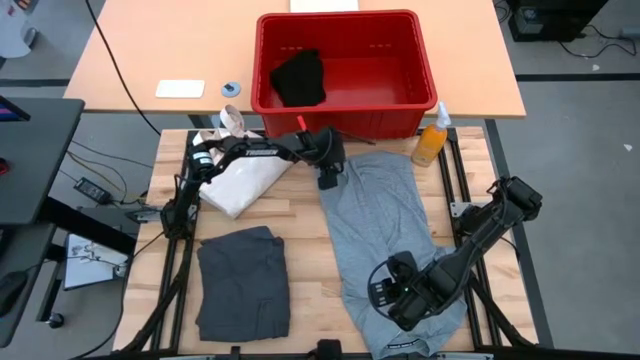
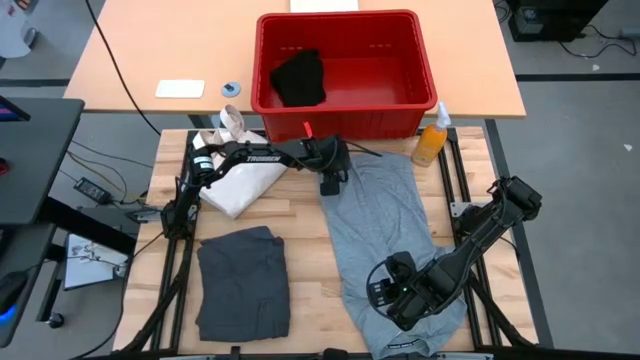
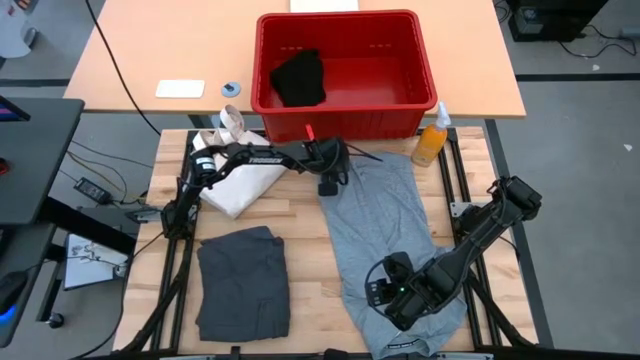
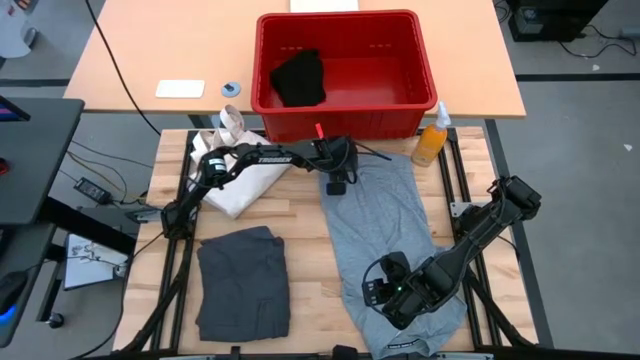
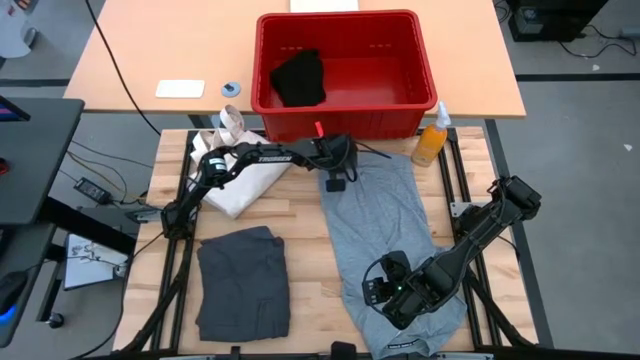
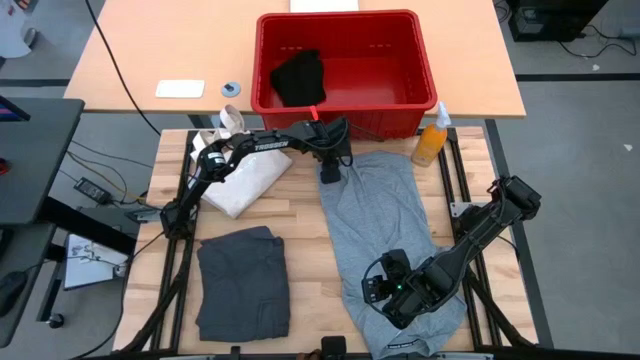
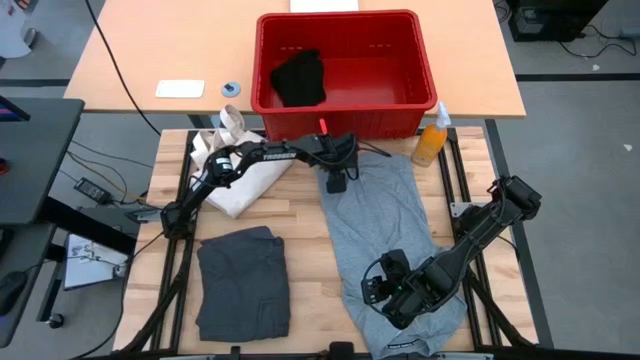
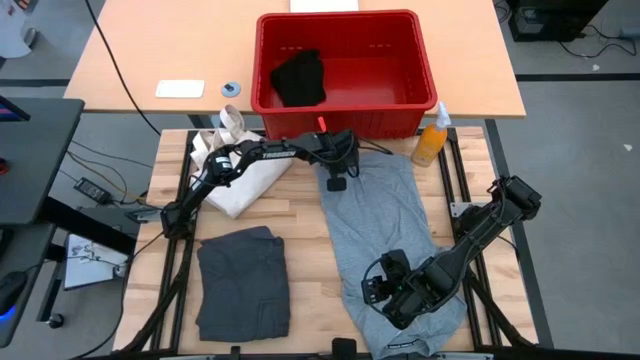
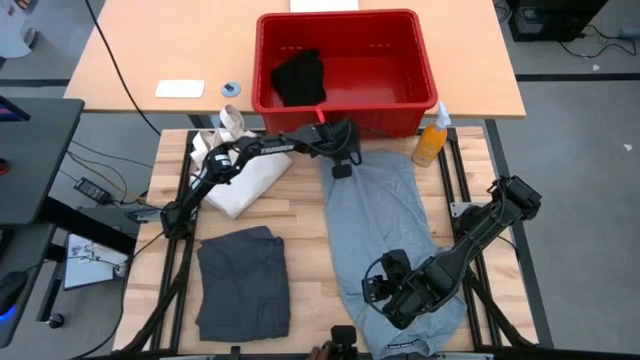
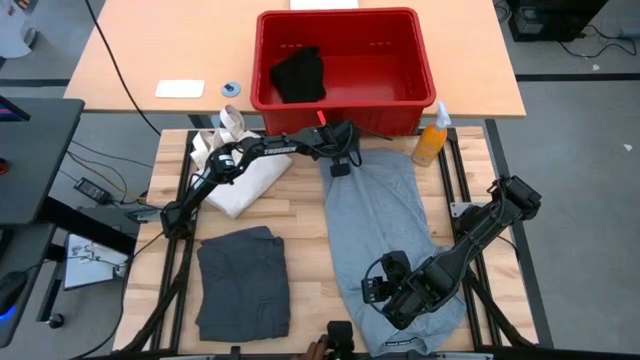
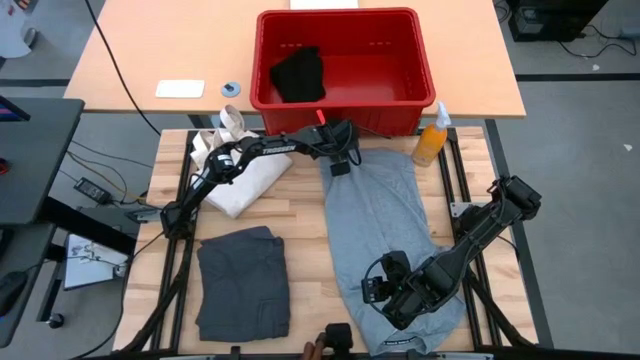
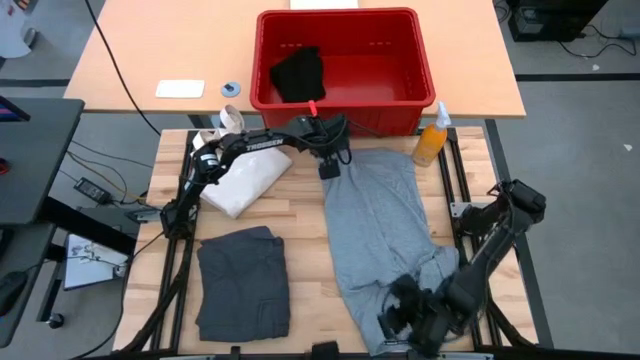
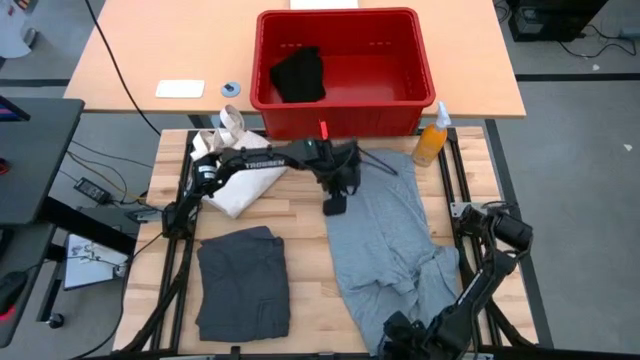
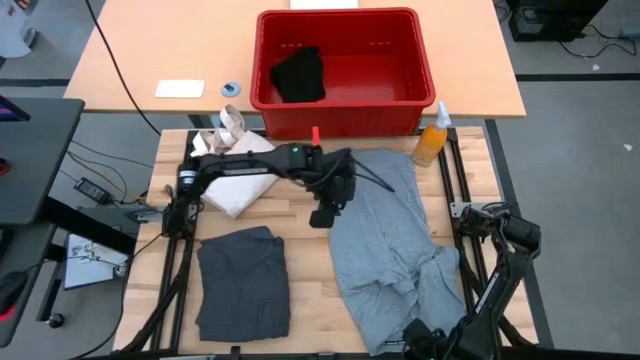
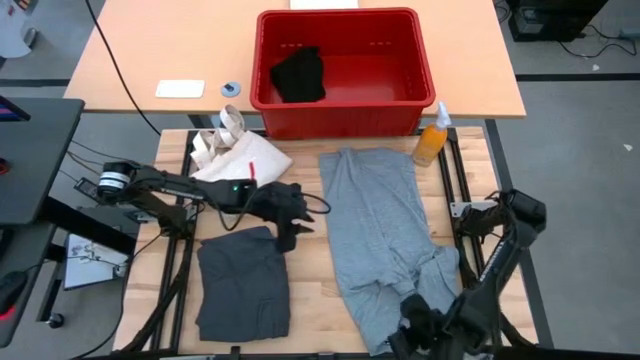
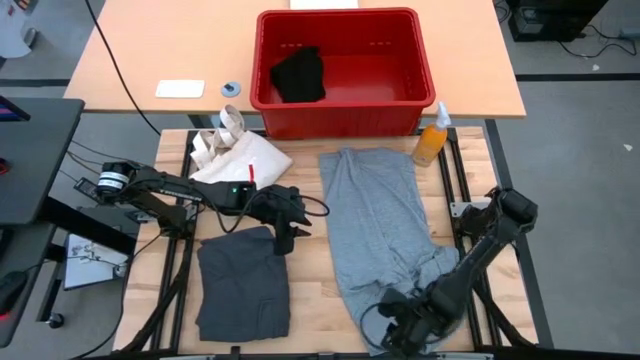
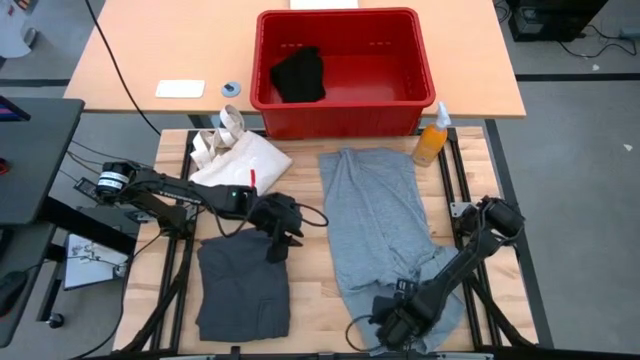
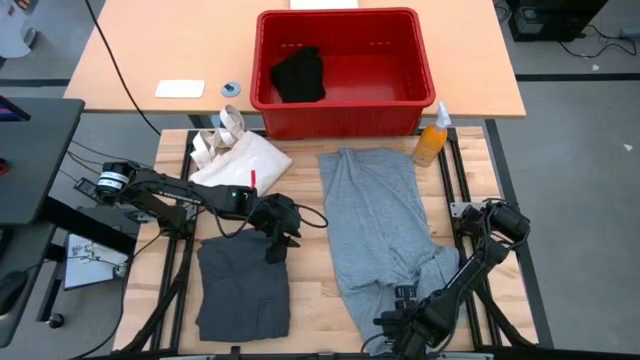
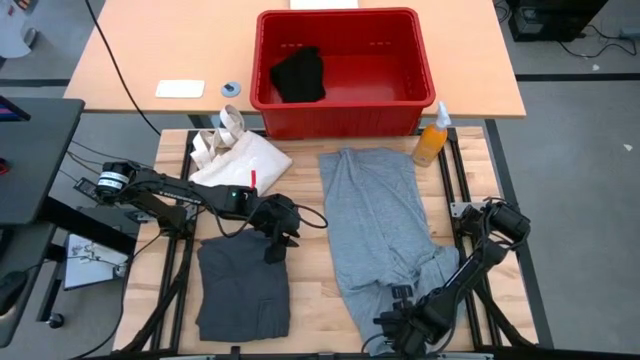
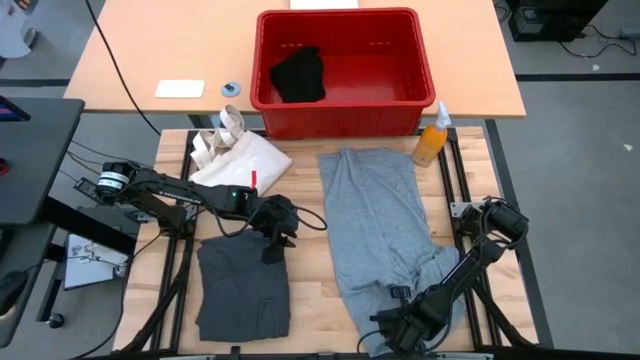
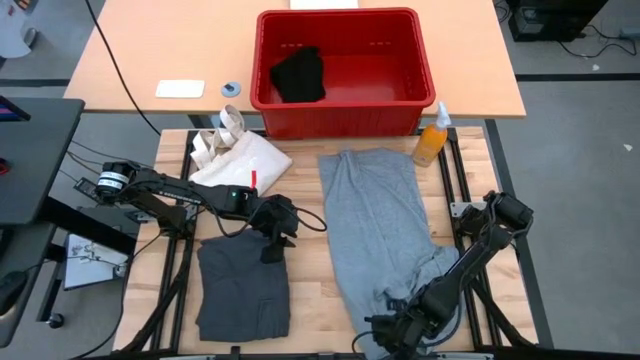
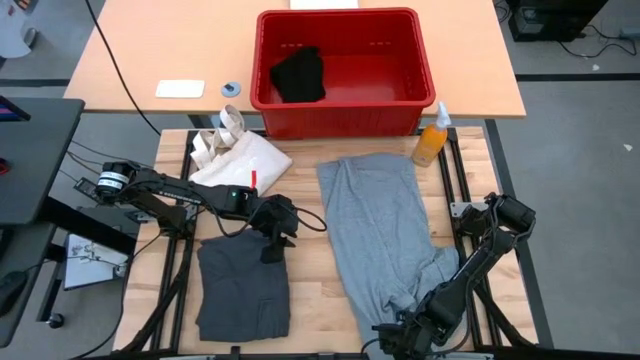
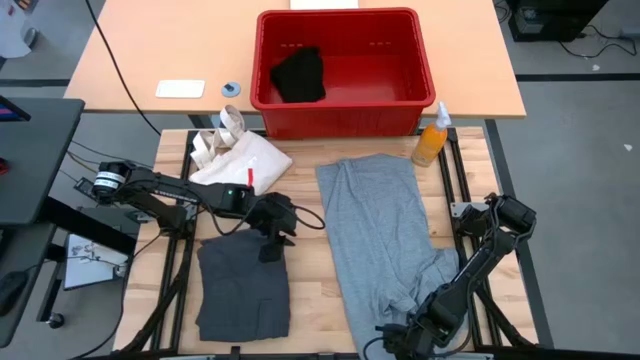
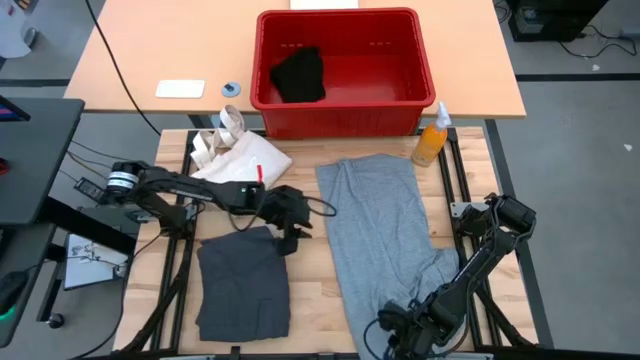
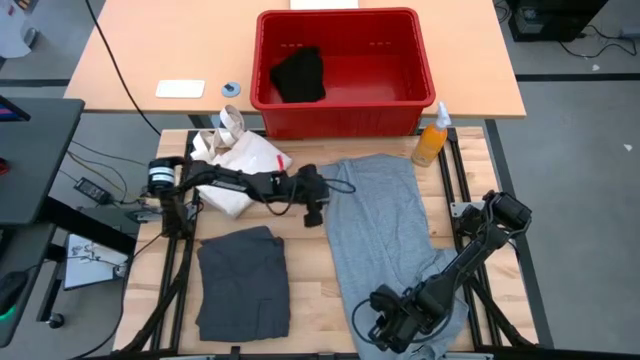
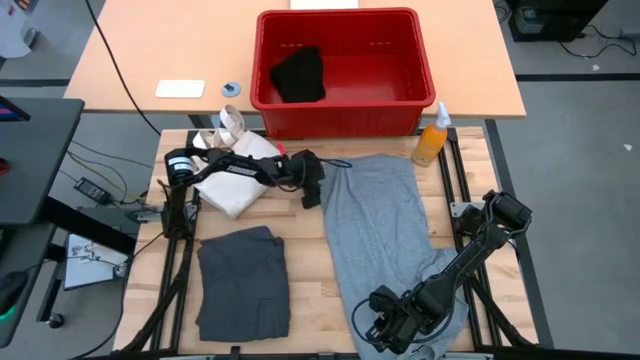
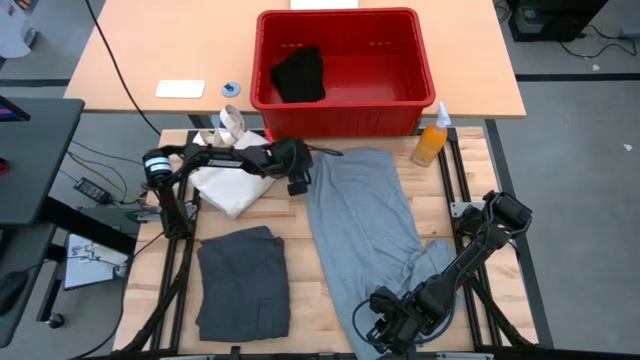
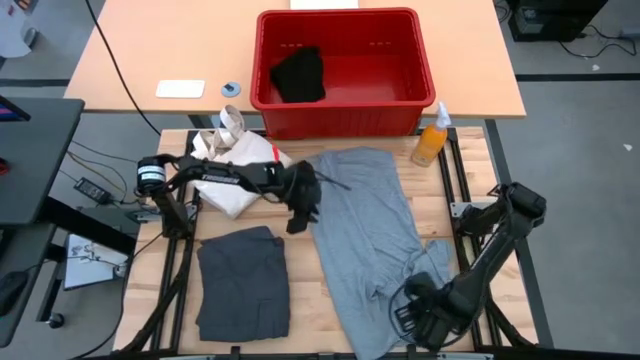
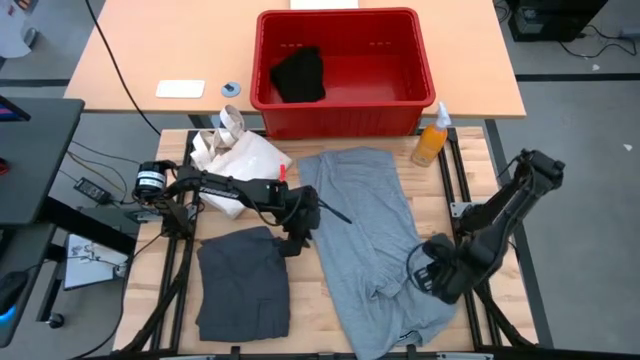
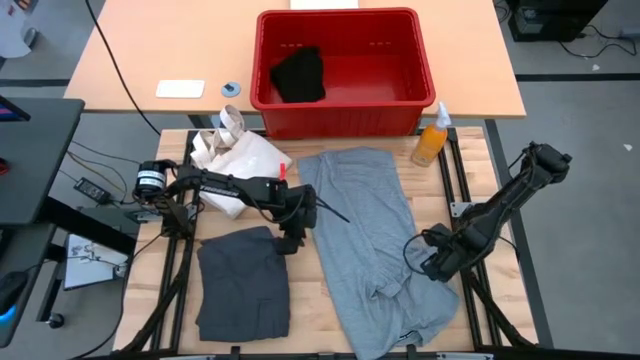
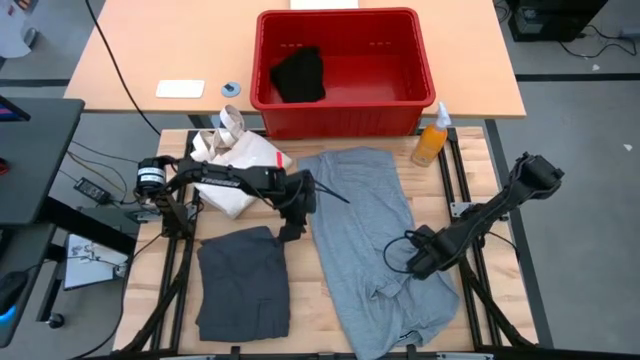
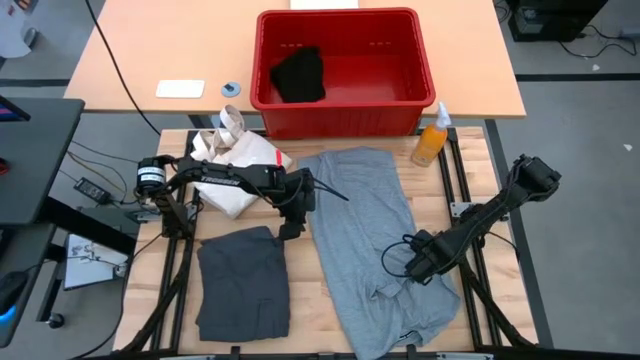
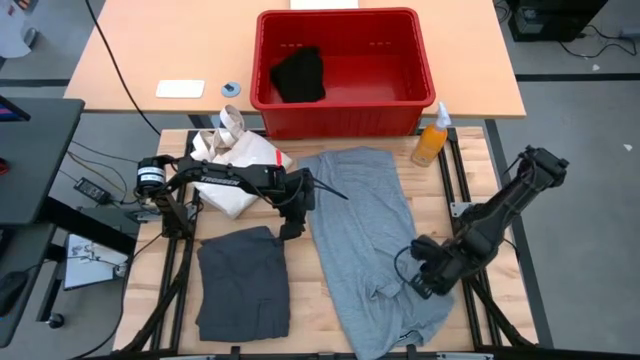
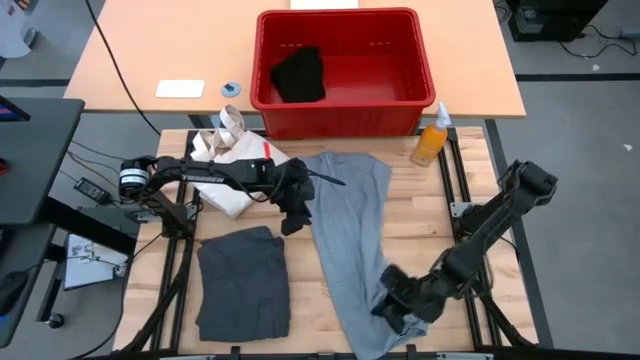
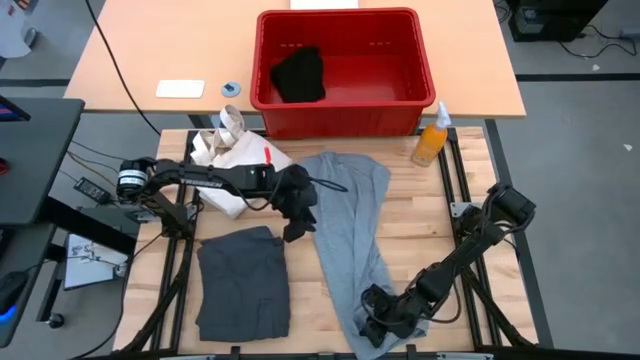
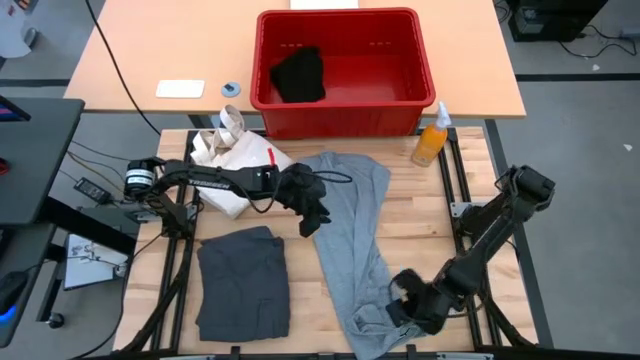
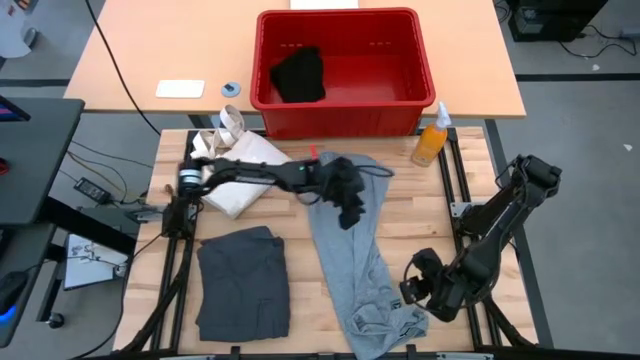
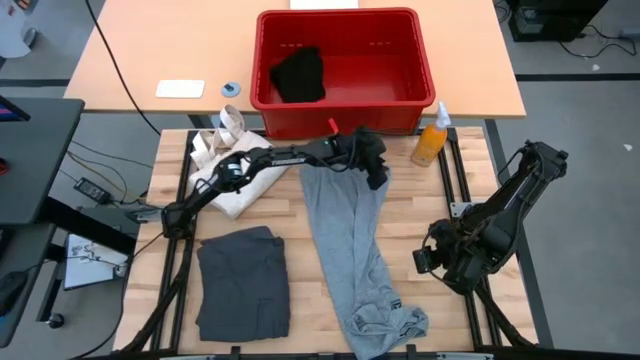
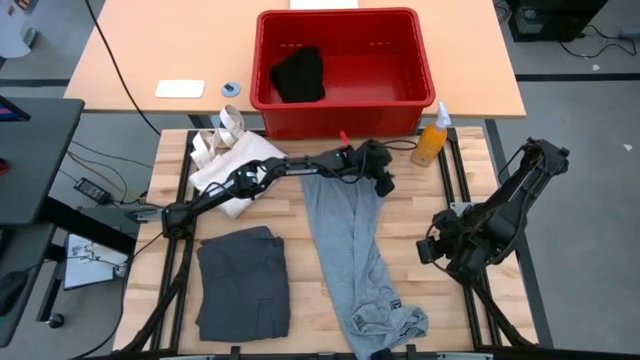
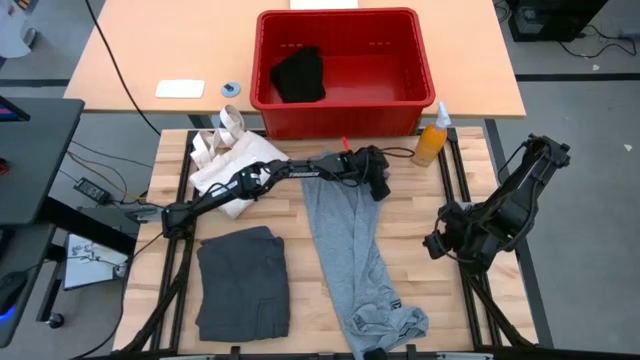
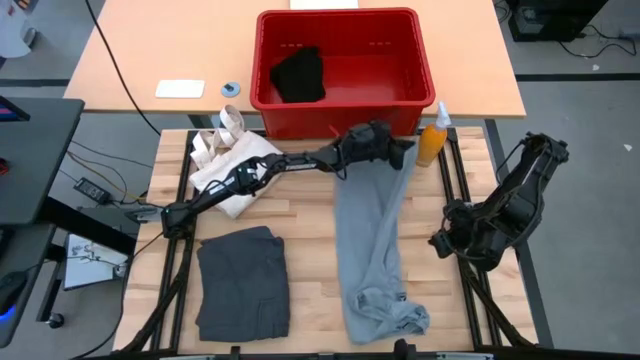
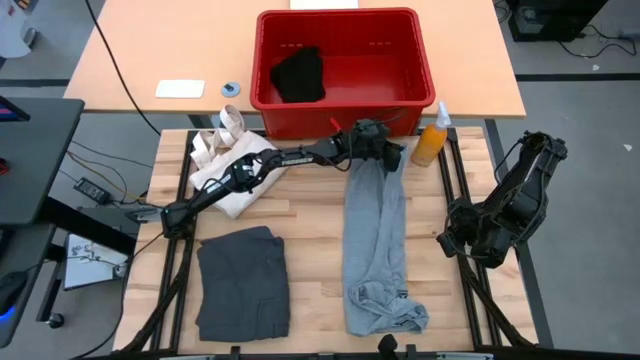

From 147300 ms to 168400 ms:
Task: Fold Laundry from Bin
Fold the light gray t-shirt
